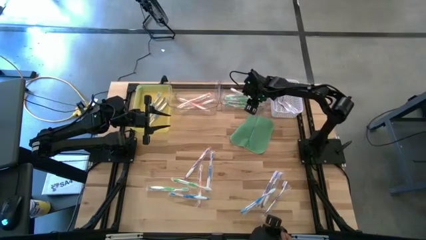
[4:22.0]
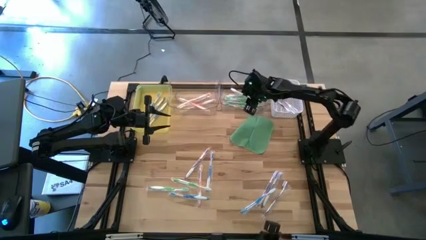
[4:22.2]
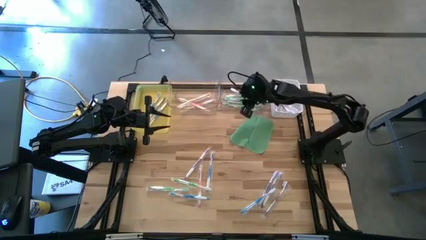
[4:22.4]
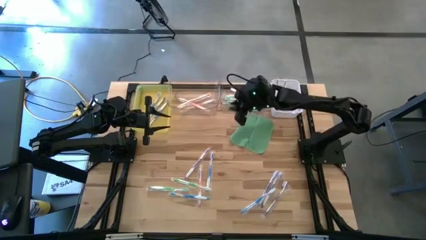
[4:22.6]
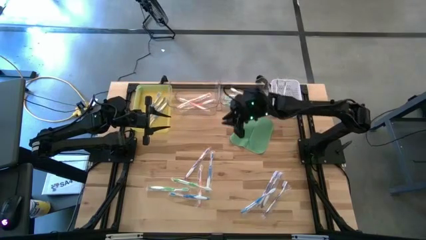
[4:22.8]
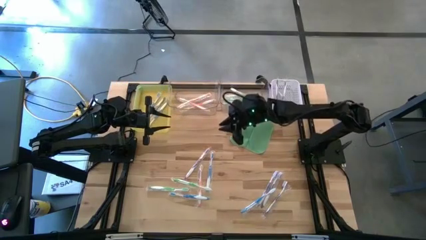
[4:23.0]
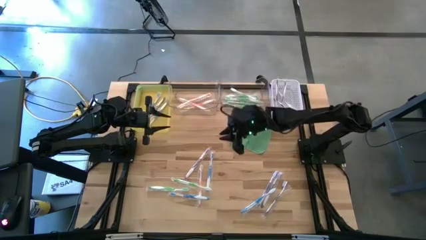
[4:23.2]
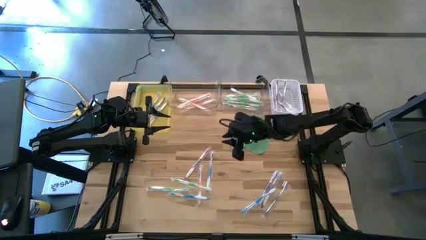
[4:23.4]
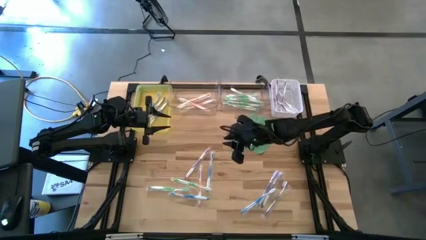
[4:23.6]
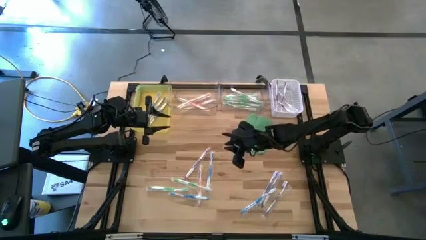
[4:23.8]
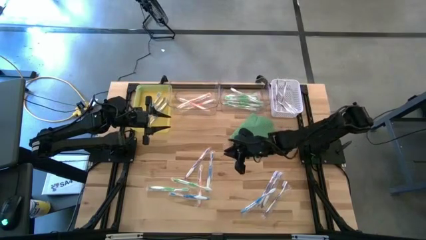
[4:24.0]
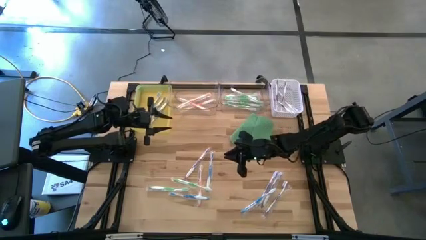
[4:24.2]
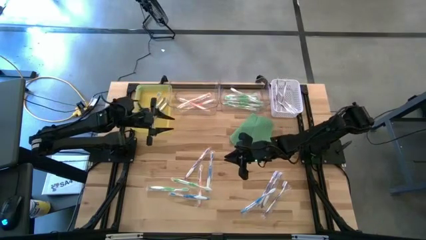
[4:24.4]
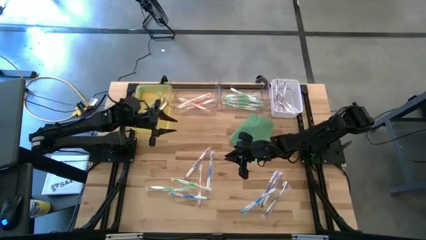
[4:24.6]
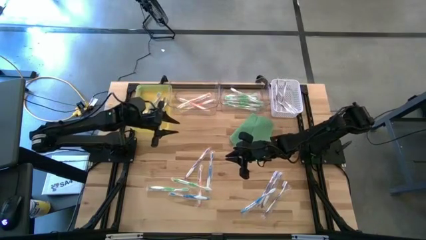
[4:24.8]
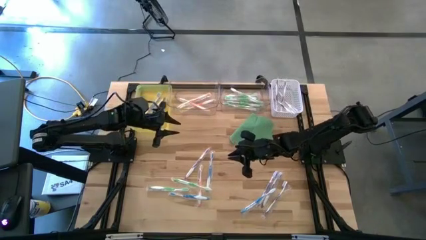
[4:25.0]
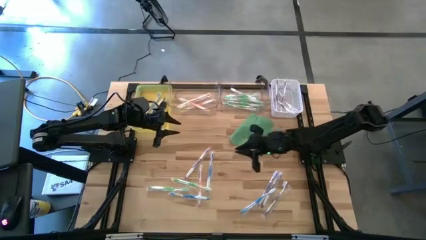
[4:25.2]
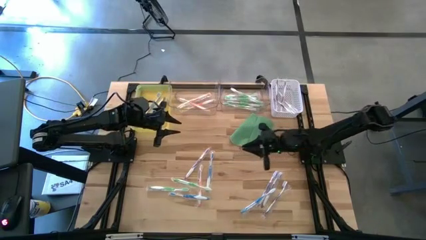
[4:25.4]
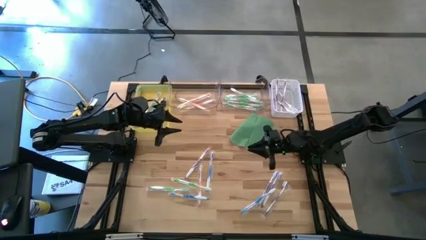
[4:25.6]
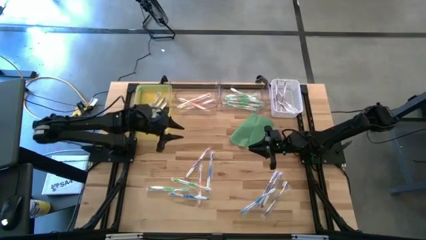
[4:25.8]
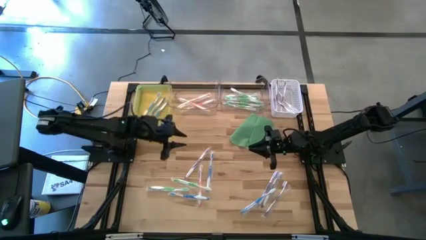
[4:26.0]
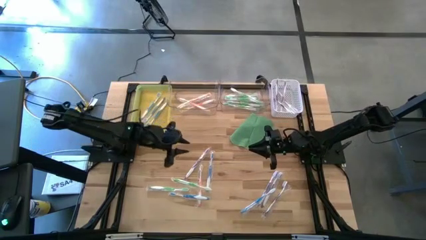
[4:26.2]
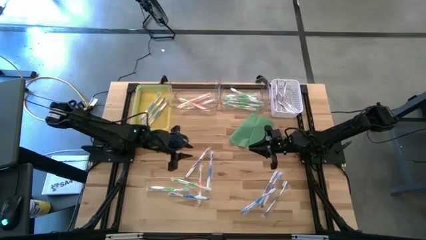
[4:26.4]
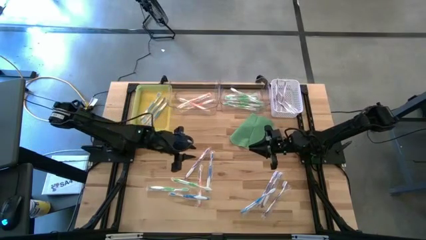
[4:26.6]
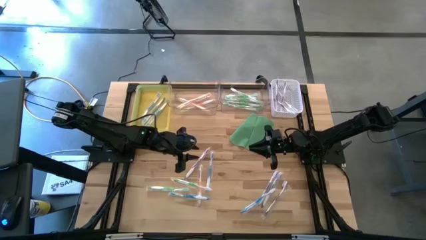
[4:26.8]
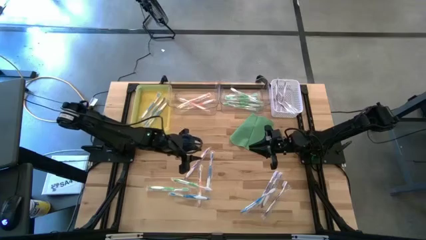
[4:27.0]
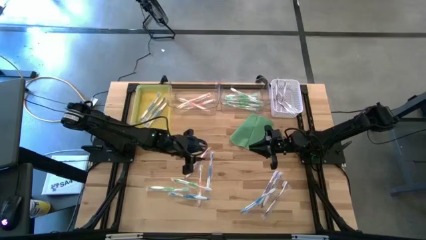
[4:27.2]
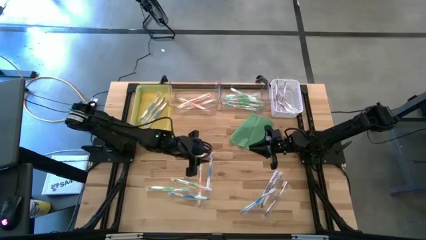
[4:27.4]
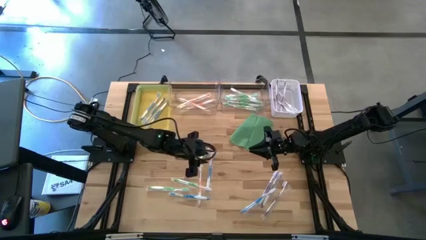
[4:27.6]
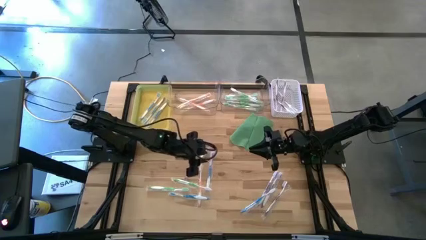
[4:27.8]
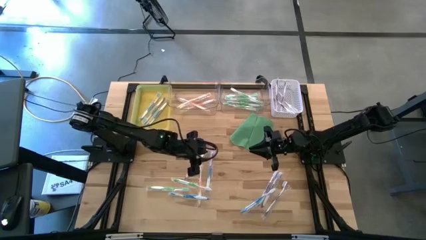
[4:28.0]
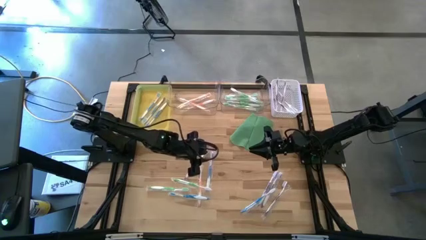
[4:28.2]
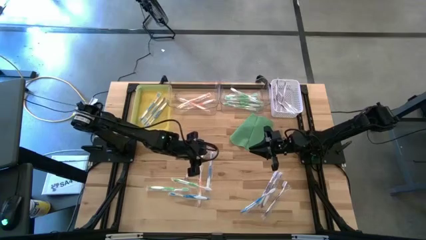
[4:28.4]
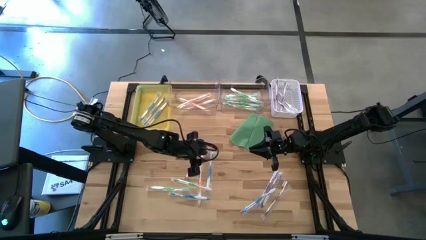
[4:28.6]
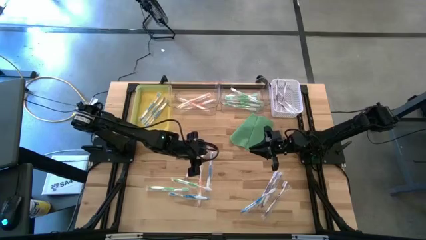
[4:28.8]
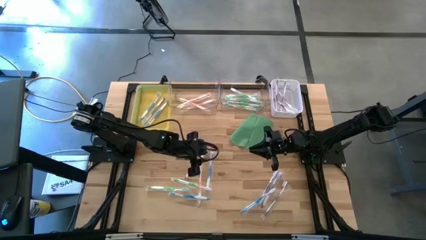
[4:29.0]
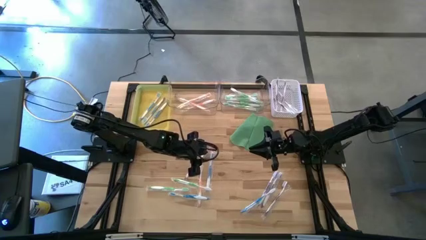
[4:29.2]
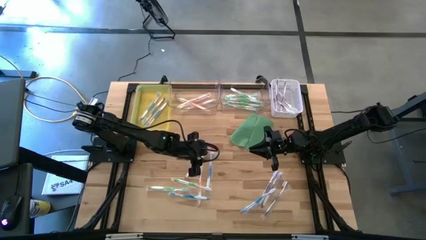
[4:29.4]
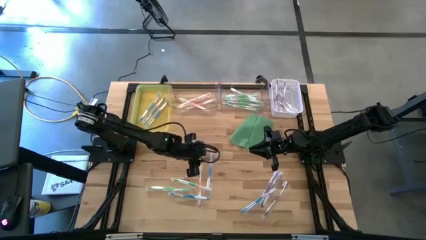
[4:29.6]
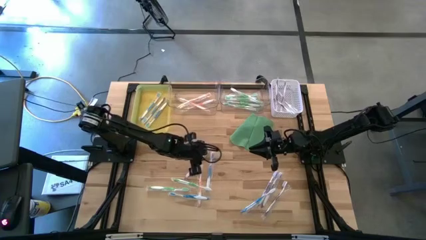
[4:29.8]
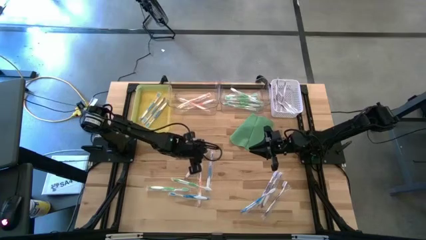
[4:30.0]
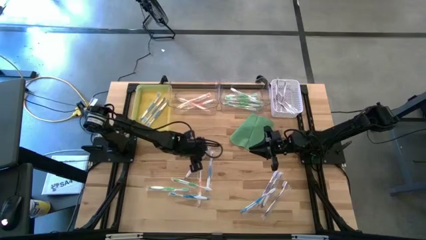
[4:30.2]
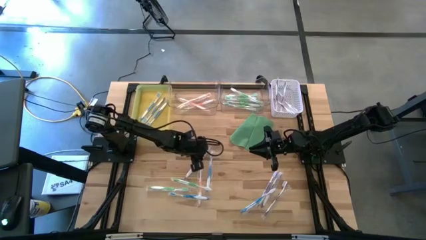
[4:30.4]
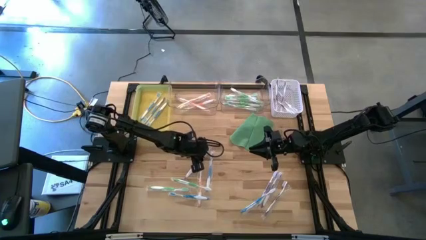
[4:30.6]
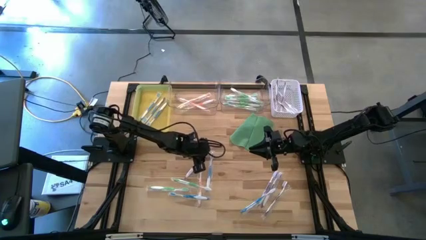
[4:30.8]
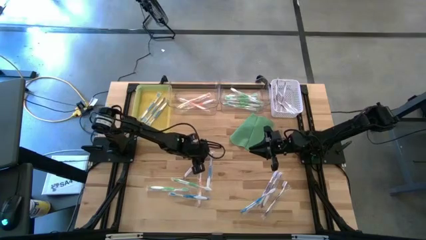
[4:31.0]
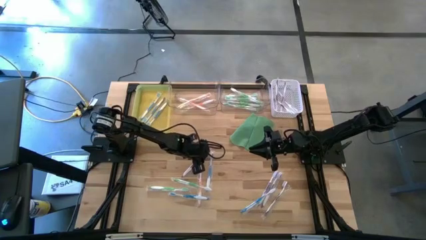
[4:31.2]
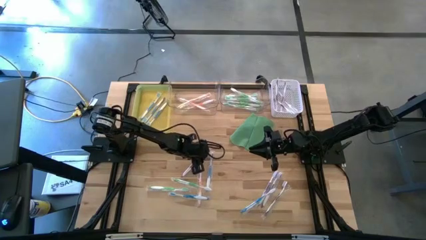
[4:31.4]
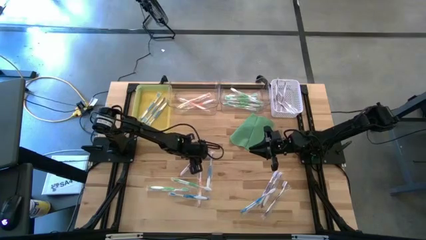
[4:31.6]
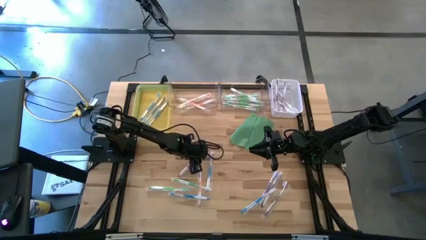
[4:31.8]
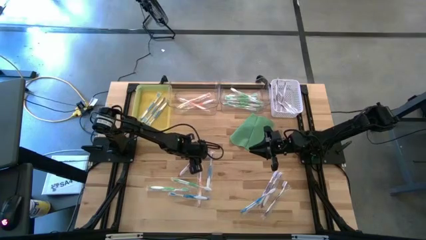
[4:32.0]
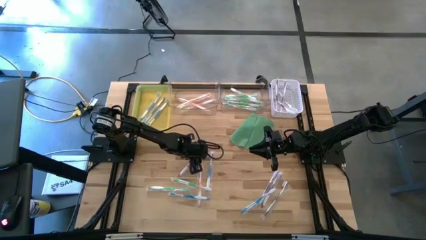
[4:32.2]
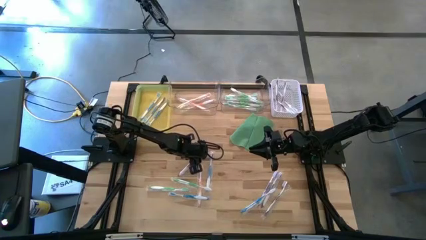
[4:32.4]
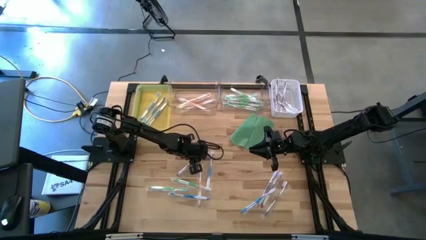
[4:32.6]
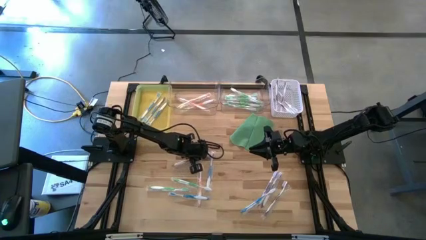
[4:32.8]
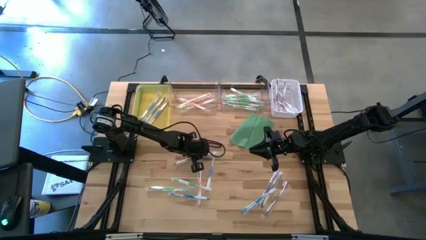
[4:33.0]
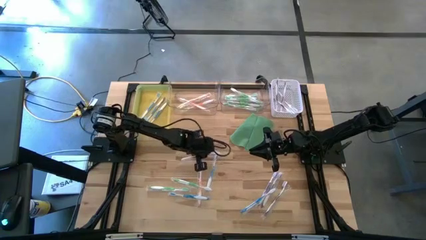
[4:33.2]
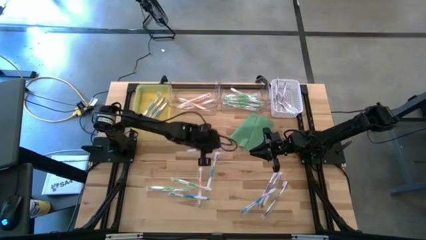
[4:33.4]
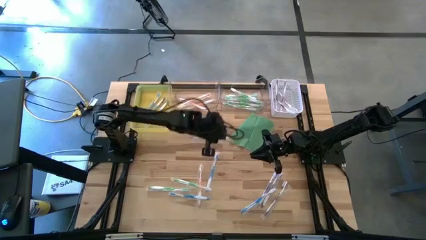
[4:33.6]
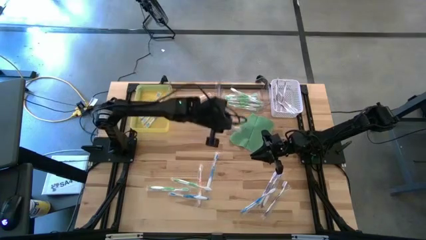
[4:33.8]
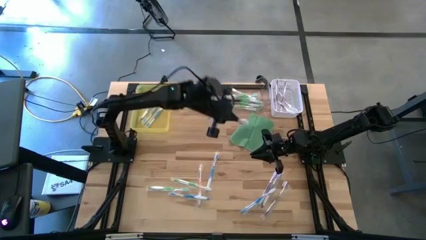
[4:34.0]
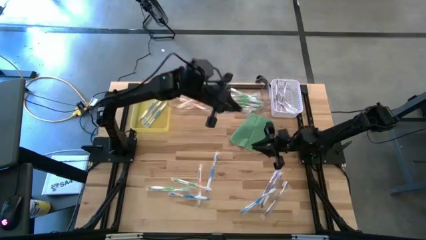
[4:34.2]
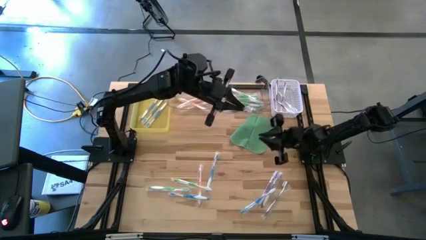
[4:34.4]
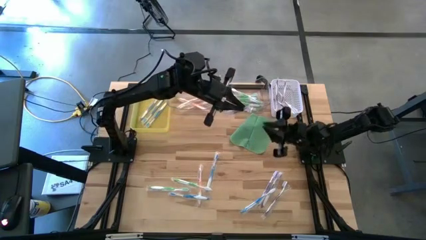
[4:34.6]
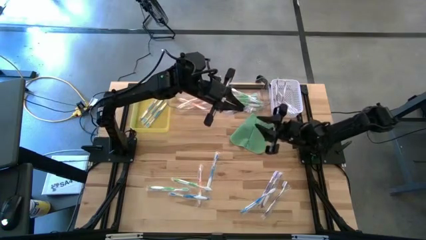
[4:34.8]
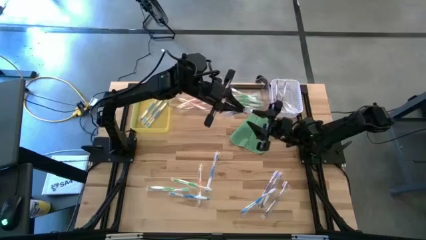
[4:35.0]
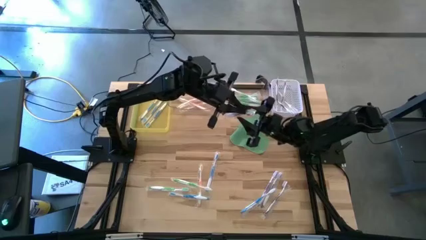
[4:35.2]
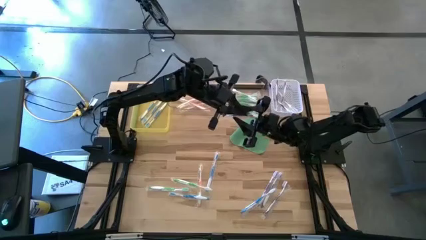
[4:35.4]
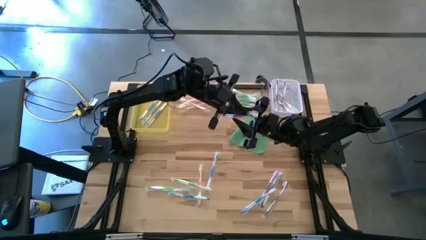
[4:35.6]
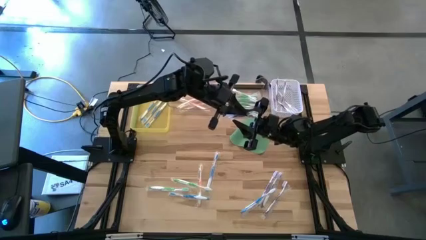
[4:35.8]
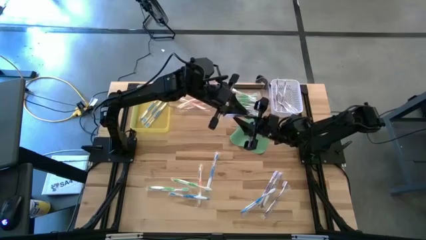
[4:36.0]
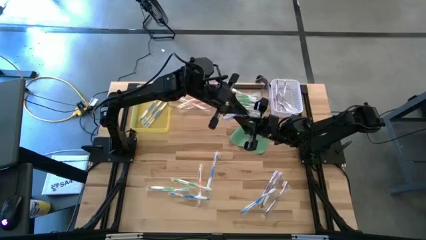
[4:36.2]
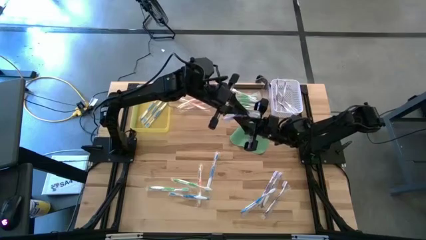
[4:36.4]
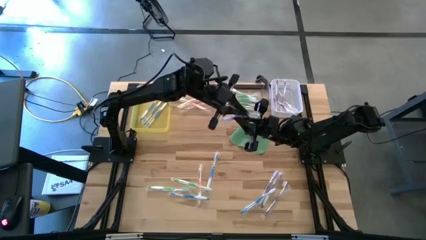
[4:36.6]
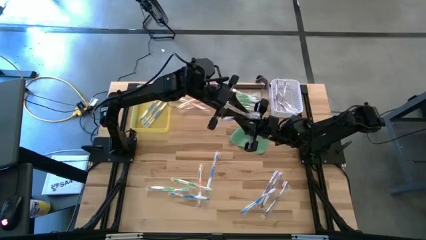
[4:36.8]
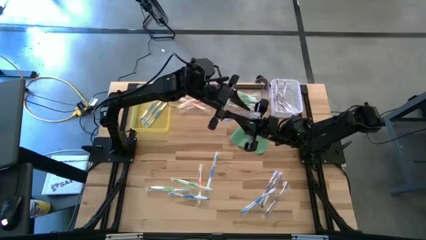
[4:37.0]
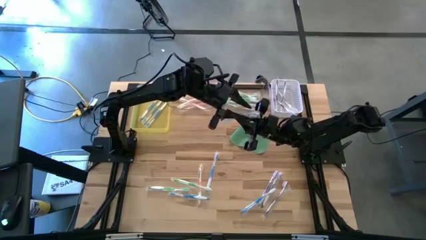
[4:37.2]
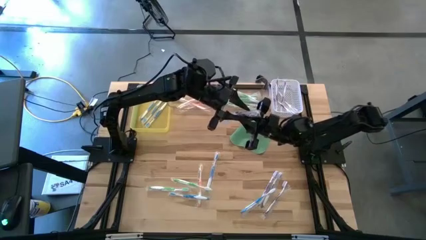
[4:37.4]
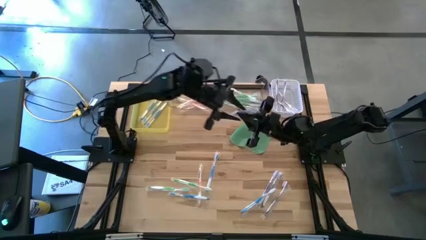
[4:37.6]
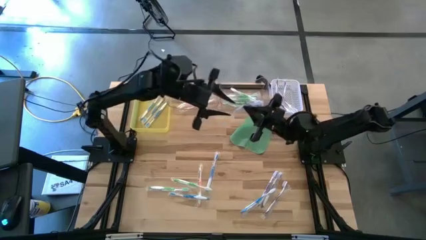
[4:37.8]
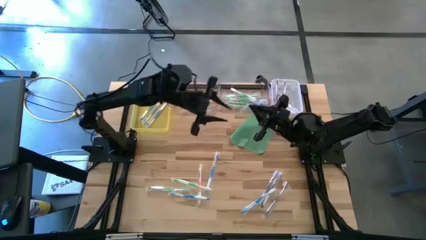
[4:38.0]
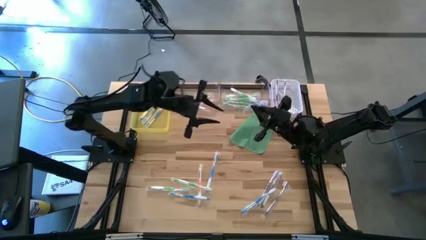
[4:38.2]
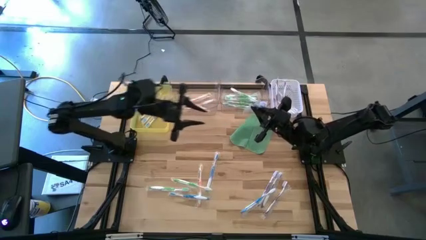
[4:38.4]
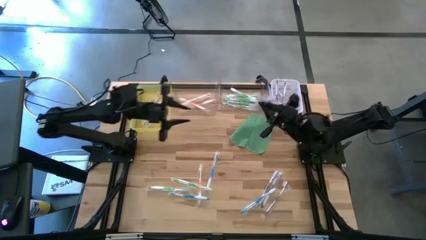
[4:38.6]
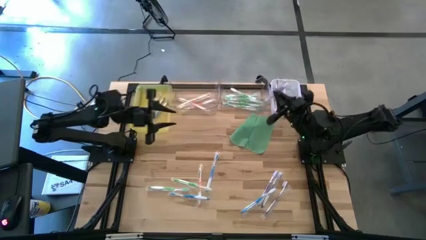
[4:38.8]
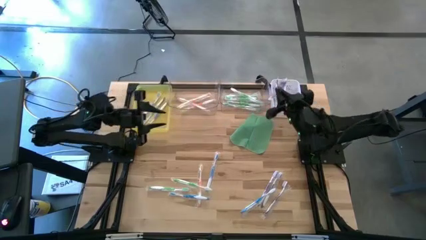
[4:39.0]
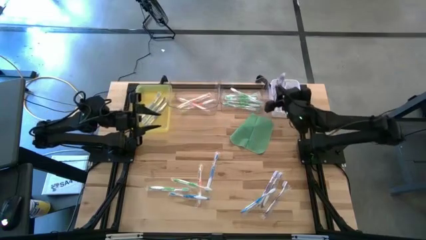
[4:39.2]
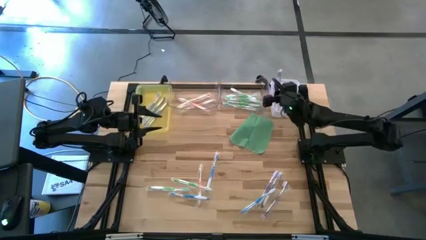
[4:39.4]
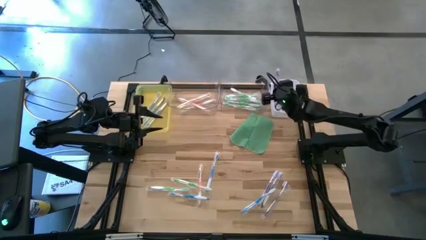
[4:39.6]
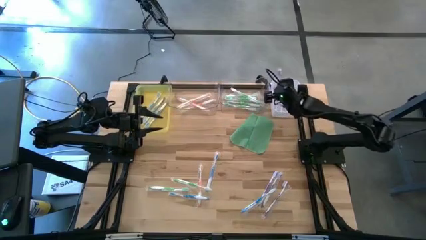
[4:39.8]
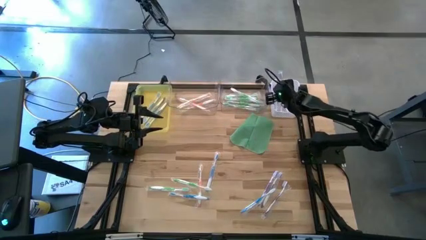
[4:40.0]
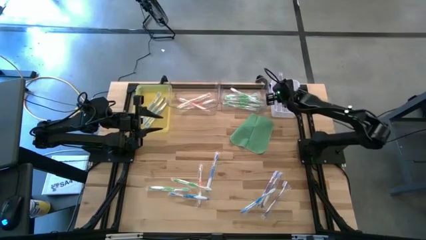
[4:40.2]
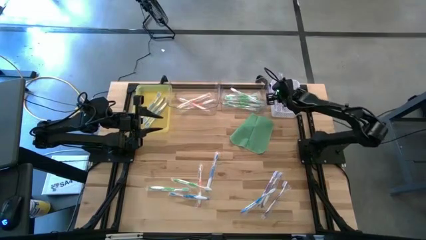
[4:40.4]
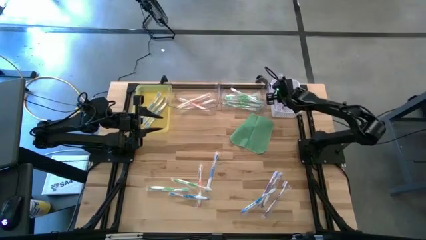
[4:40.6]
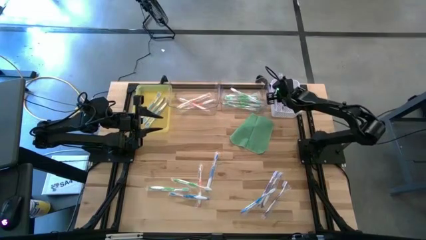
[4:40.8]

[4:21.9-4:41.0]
Task: Pick & Place Toothbrushes
Put the purple toothbrush into the white bin
